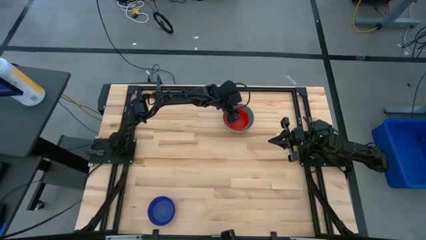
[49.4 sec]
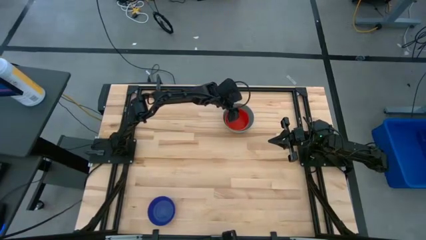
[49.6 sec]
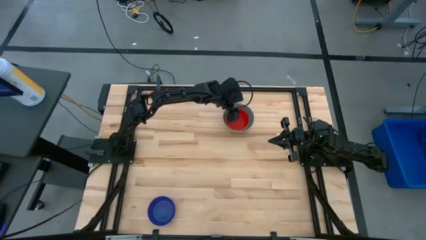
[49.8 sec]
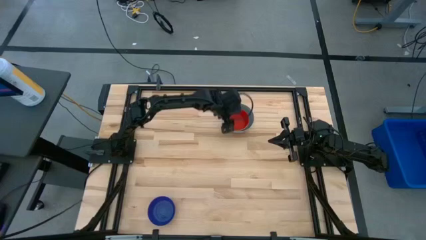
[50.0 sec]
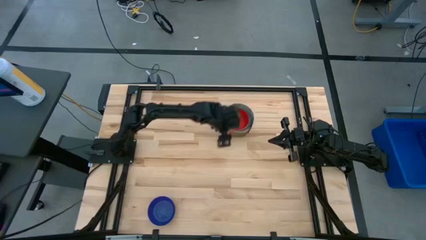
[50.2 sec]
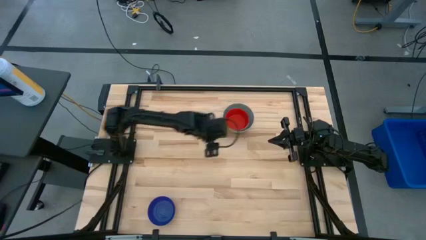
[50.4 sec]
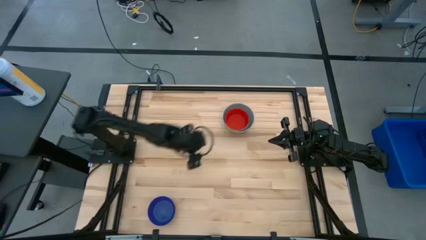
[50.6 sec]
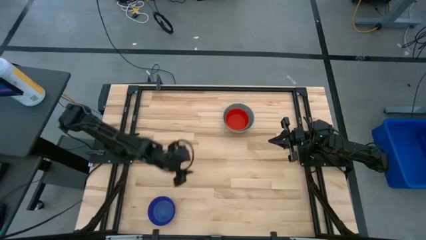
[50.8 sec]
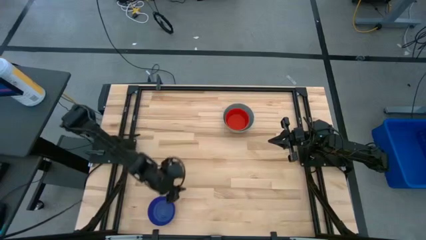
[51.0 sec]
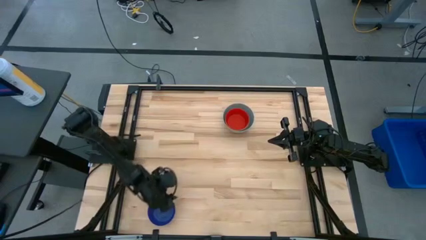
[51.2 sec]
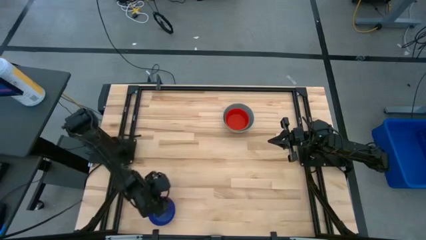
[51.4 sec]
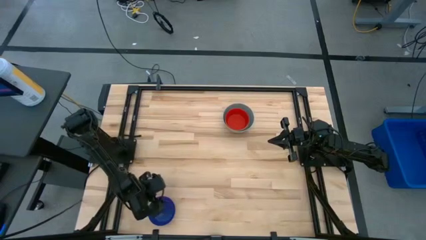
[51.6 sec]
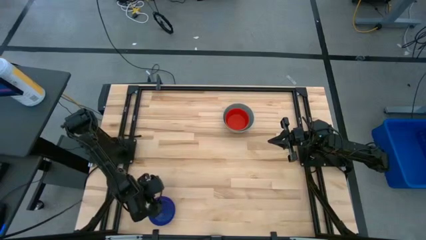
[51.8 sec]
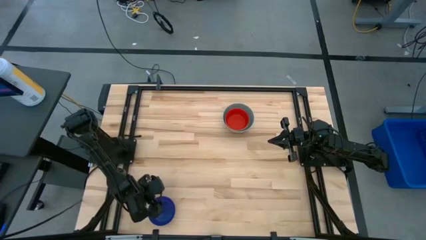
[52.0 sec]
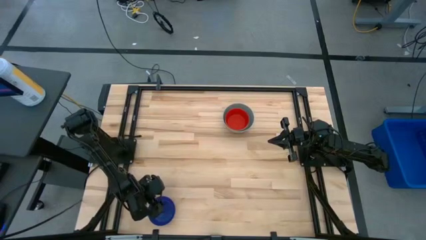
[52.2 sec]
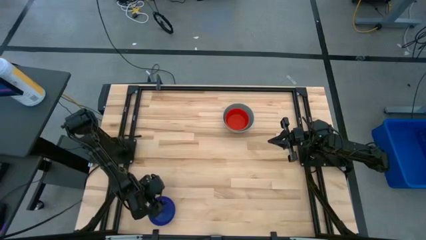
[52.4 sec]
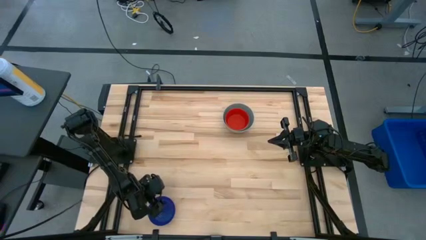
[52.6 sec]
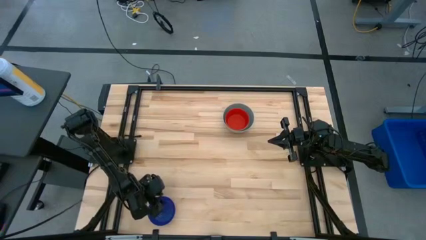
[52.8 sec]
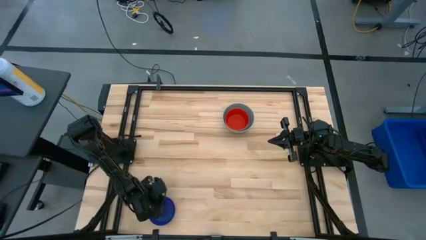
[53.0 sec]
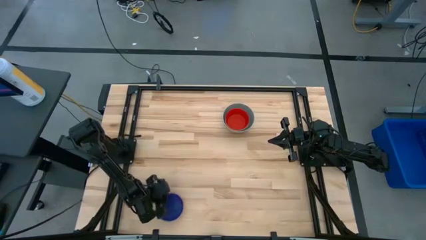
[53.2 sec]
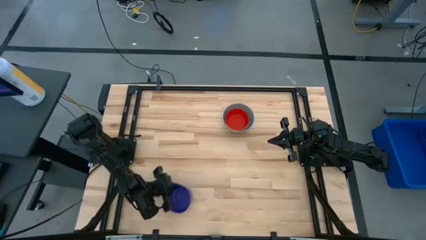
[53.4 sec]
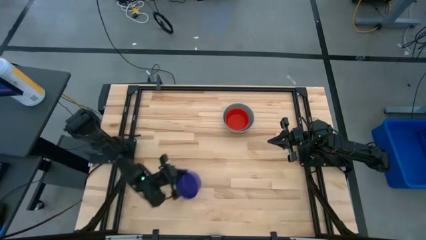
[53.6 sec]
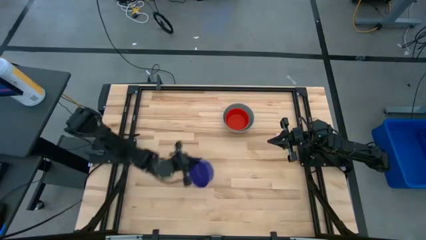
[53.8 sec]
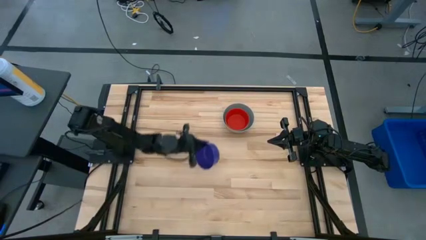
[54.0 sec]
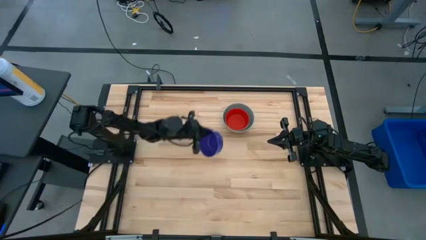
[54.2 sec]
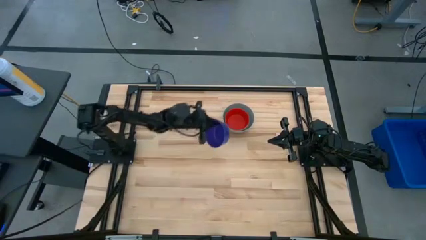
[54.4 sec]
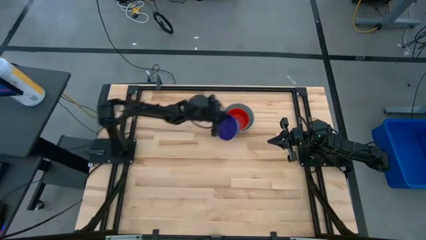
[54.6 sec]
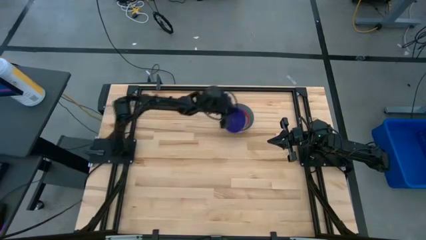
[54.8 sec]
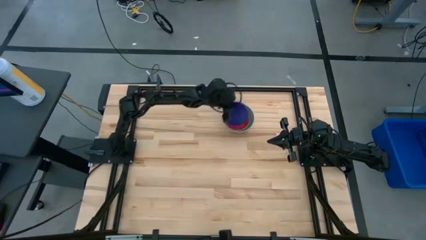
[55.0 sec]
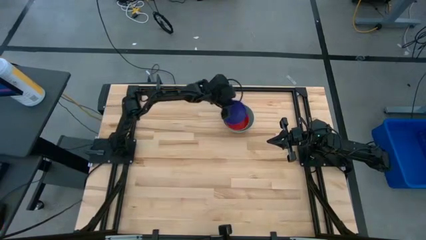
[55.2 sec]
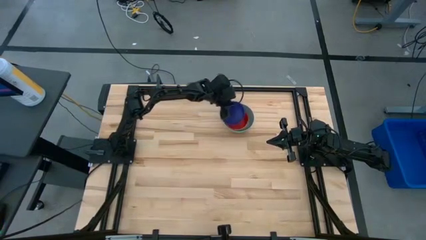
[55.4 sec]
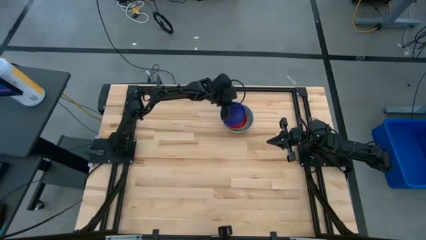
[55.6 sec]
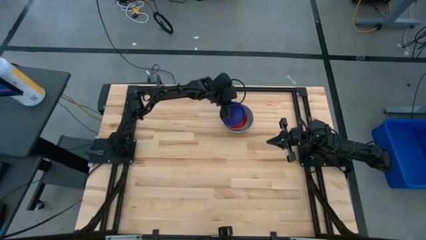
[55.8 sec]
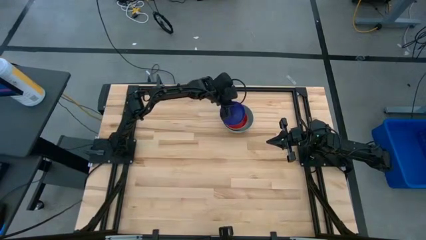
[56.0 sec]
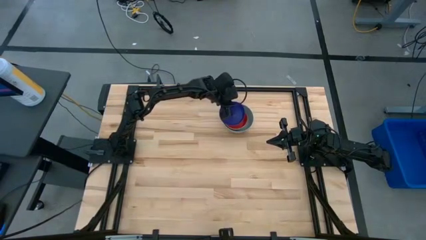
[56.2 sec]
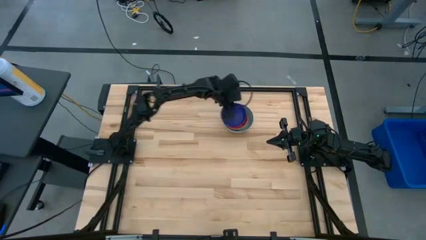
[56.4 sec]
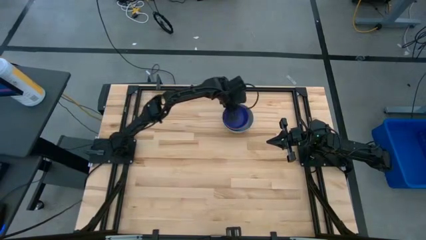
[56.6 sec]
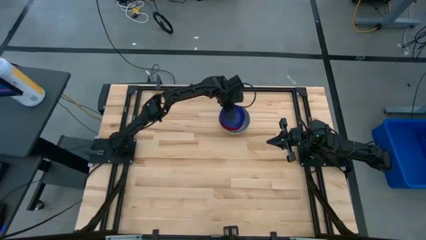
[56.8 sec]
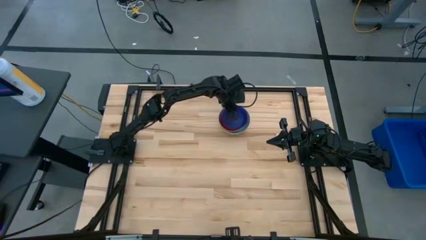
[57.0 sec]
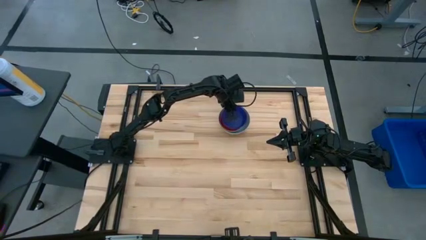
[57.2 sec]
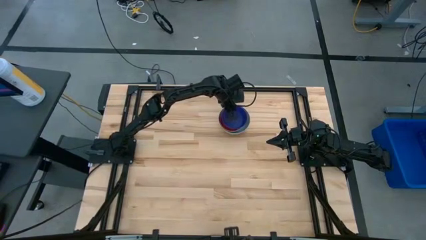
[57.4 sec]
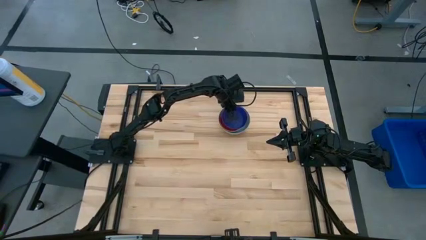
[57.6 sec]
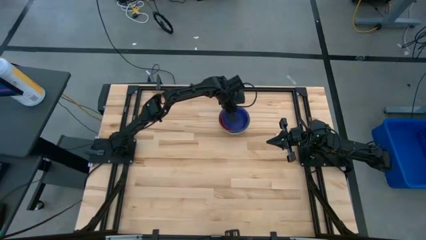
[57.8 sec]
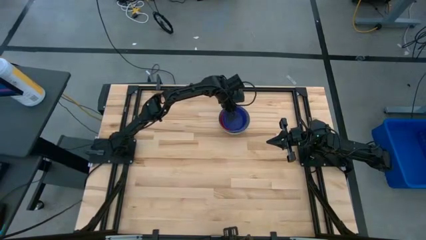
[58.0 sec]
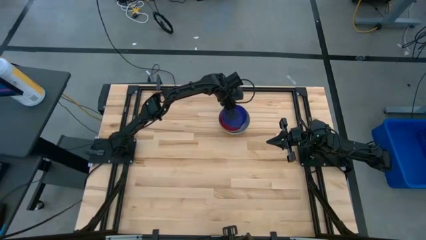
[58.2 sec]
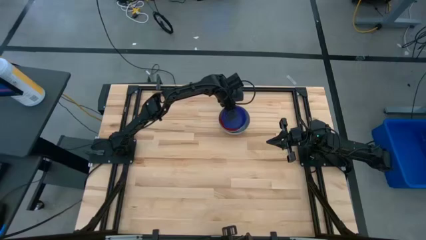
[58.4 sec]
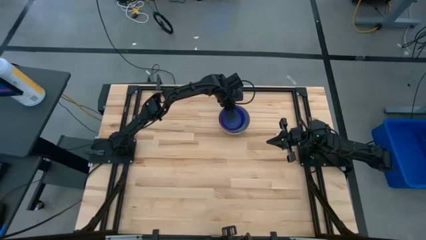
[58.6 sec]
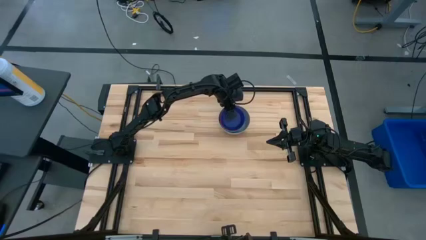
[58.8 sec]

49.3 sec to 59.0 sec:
Stack the dark blue bowl on the red bowl

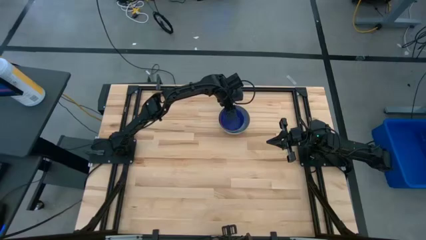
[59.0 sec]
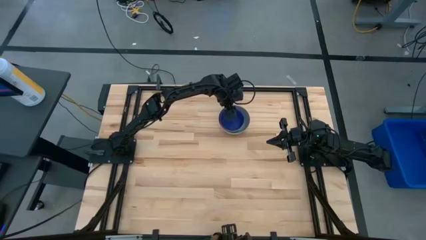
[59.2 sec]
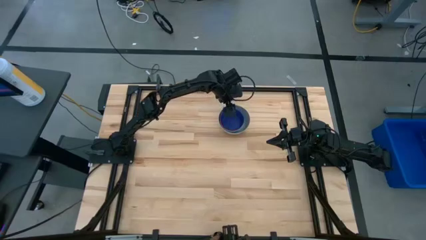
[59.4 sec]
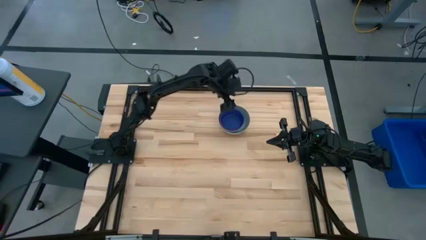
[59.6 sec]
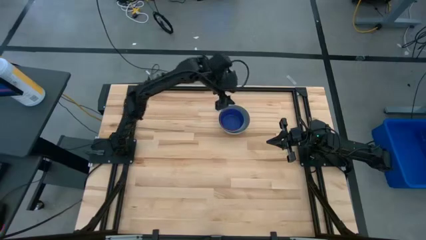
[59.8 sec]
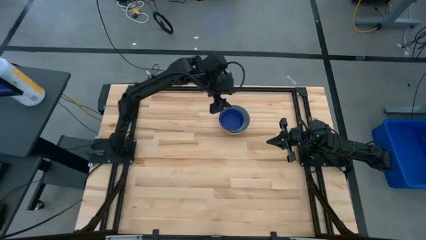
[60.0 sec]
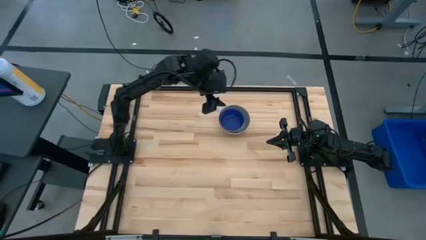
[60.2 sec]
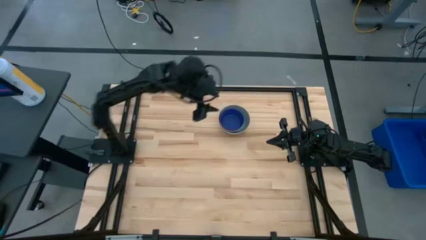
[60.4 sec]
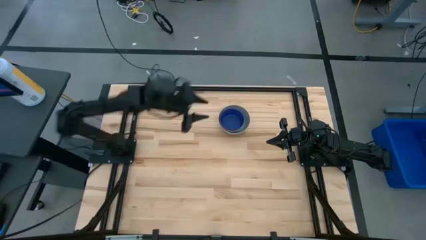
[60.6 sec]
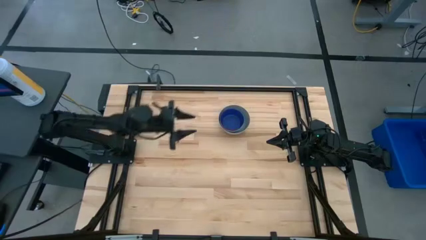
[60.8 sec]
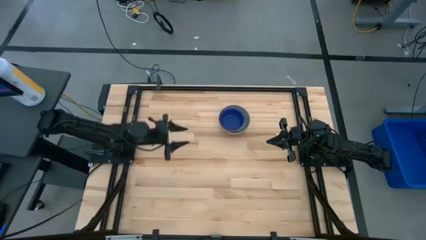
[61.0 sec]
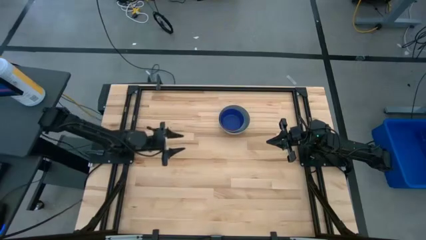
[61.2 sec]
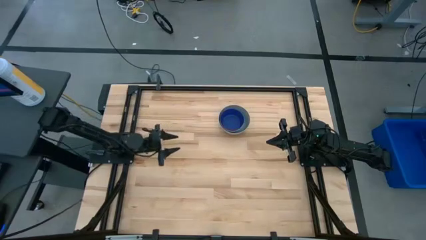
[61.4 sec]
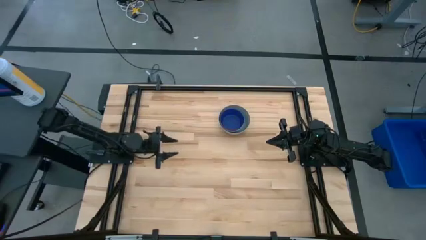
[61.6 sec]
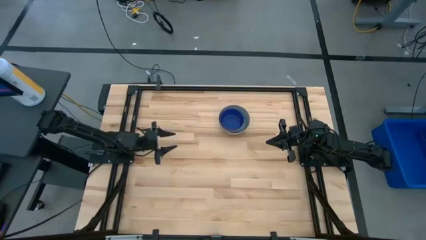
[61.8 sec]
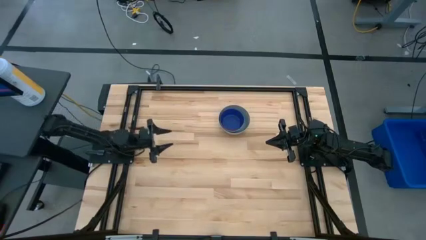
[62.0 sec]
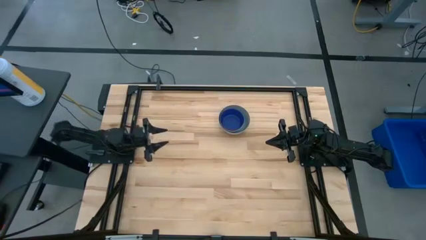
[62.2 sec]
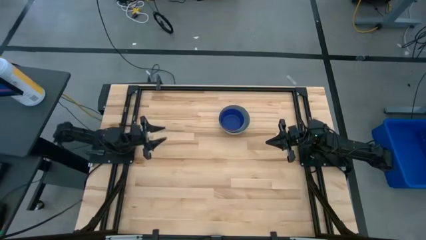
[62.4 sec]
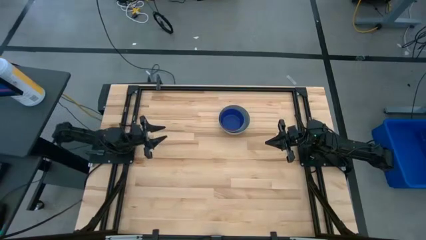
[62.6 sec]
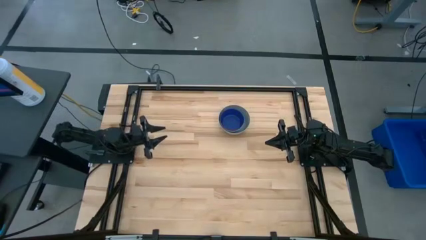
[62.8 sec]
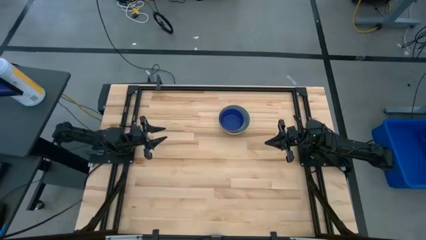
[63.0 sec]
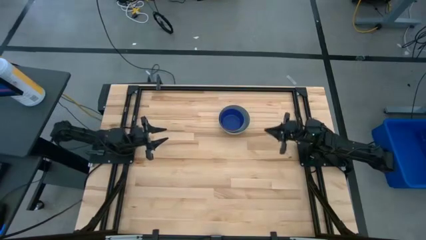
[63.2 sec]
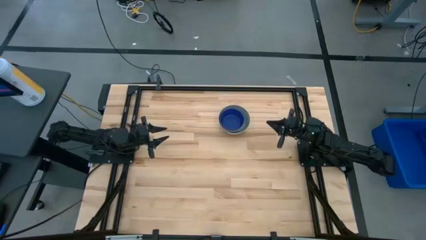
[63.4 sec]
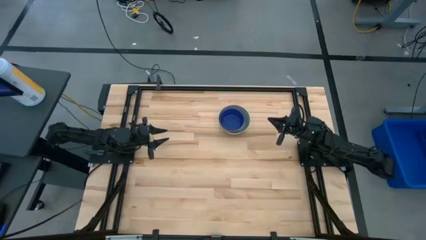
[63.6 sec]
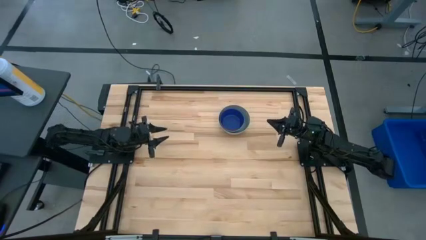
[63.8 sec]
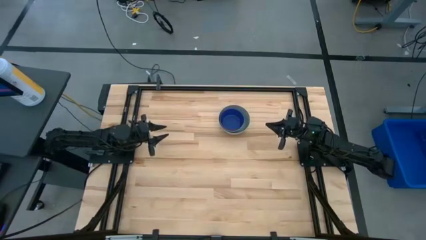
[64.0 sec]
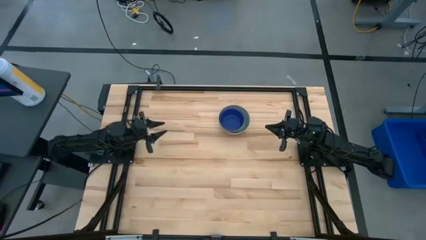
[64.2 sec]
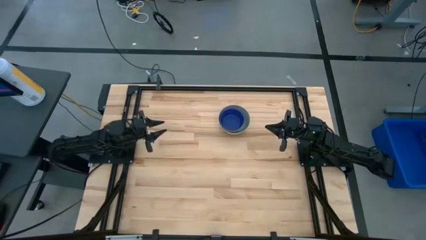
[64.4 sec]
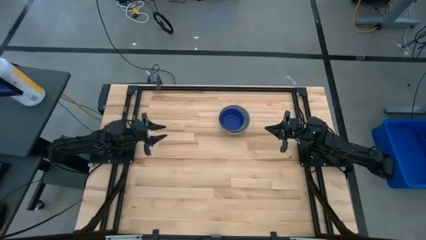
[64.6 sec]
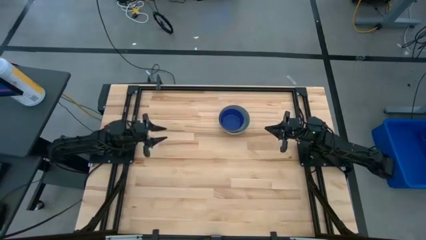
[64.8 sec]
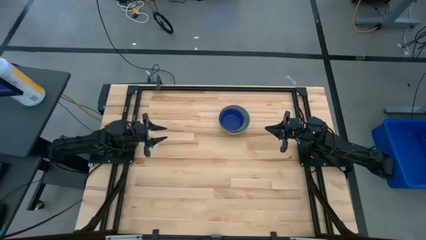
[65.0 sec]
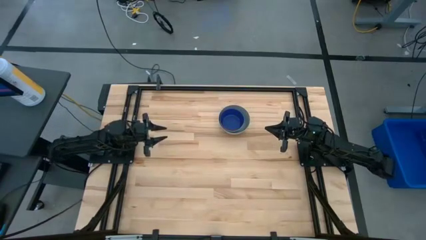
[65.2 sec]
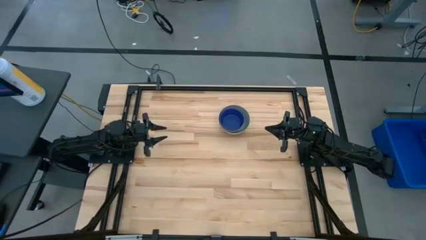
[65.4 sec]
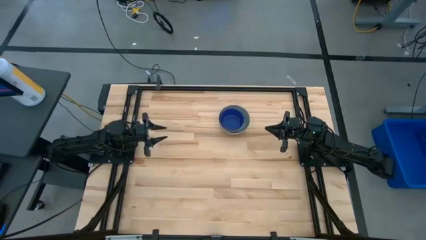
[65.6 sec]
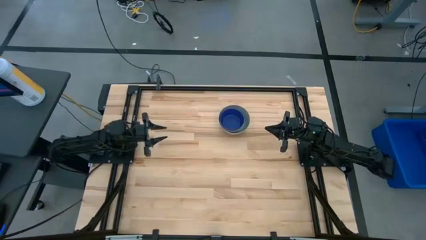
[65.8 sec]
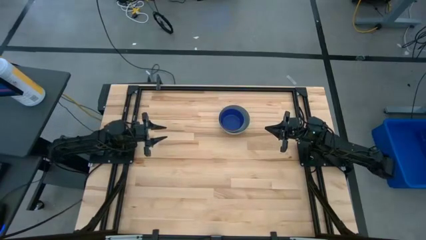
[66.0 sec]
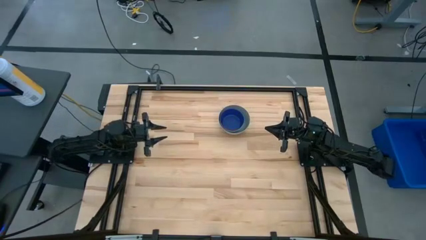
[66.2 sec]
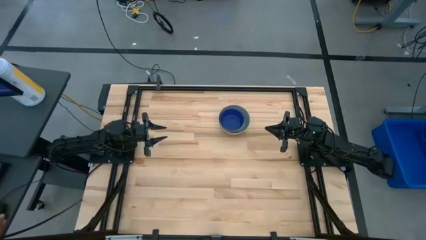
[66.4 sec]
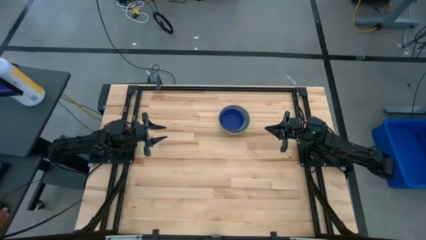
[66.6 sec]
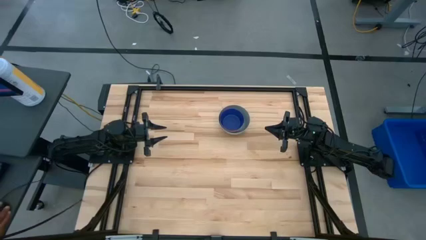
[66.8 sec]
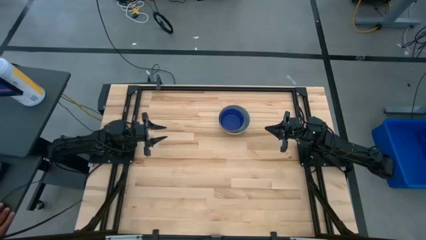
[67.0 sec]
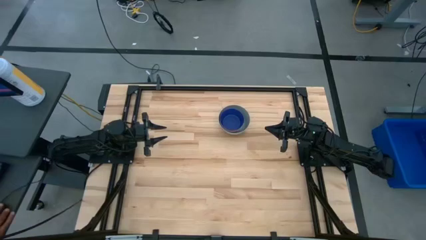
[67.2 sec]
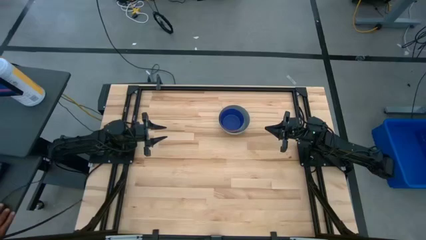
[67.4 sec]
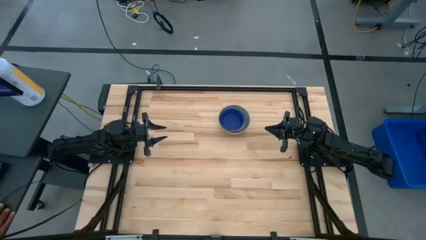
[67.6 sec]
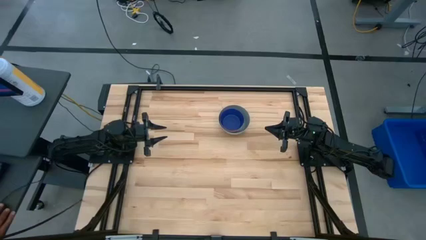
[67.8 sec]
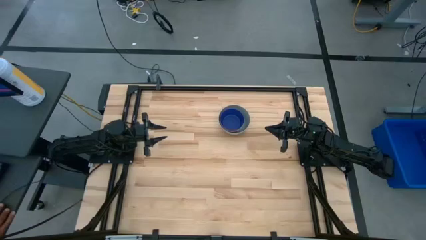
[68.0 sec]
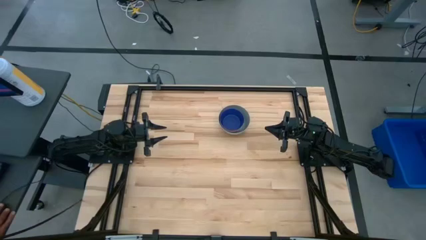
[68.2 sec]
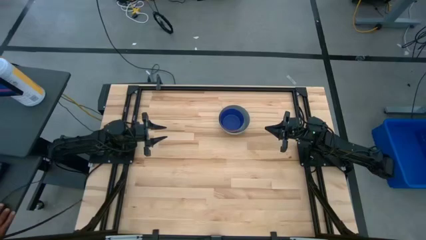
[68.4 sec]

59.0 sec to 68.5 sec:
Return to Home Position
